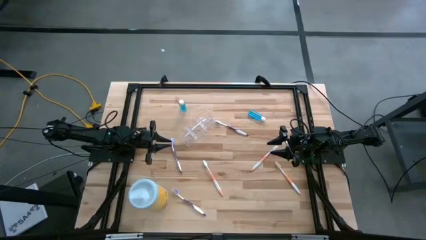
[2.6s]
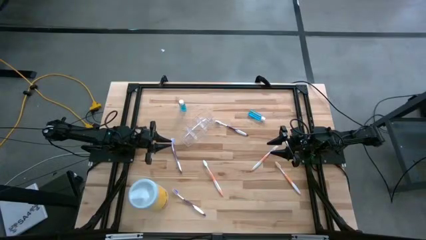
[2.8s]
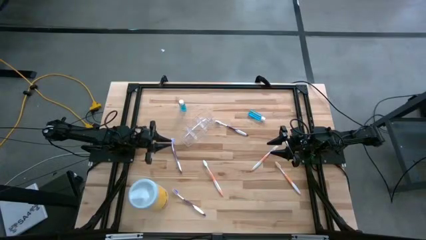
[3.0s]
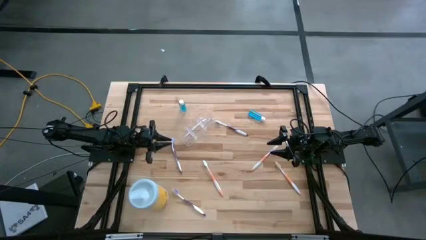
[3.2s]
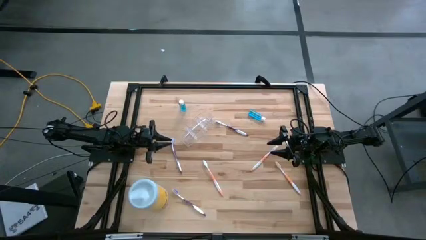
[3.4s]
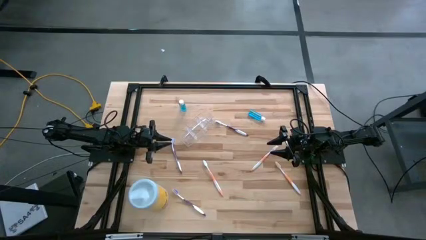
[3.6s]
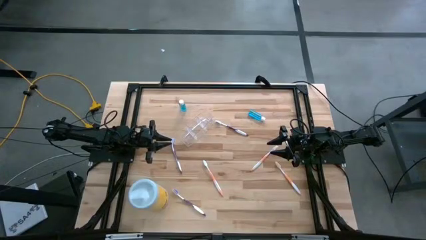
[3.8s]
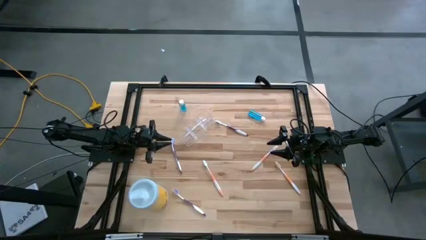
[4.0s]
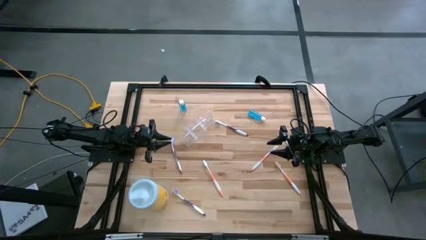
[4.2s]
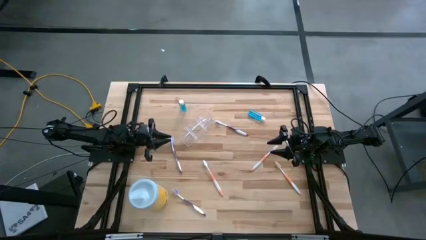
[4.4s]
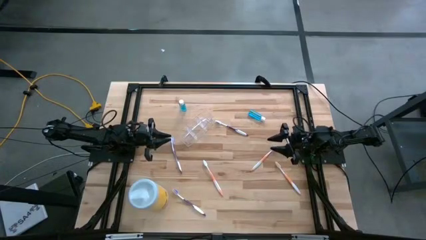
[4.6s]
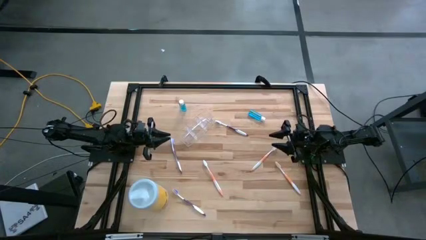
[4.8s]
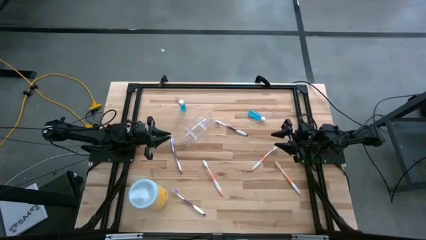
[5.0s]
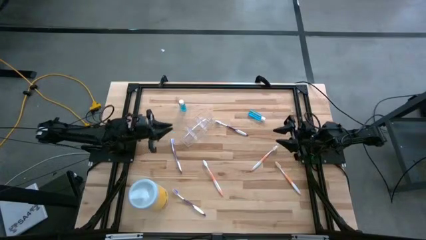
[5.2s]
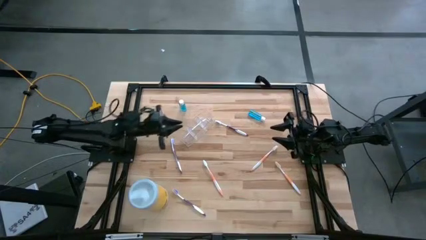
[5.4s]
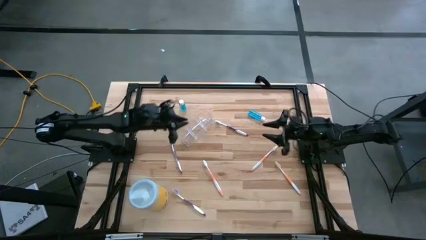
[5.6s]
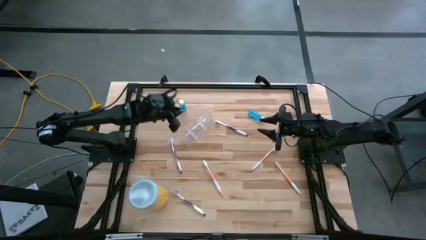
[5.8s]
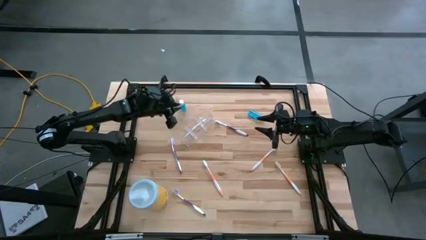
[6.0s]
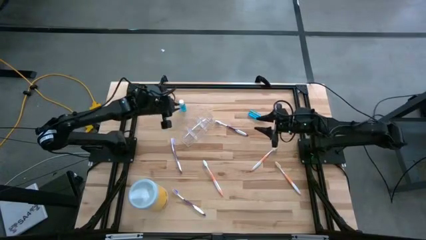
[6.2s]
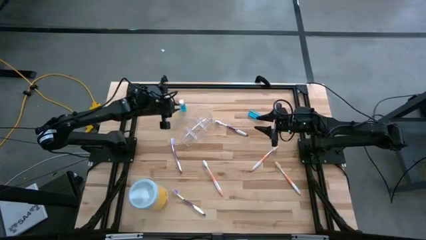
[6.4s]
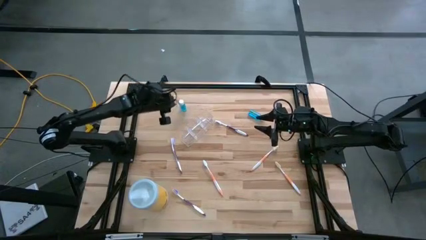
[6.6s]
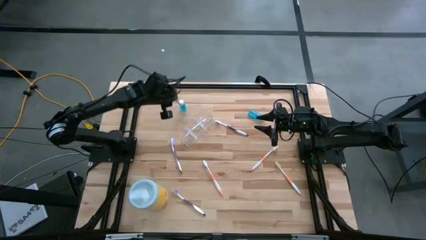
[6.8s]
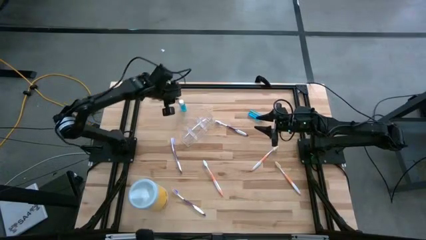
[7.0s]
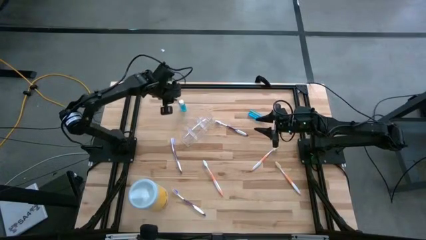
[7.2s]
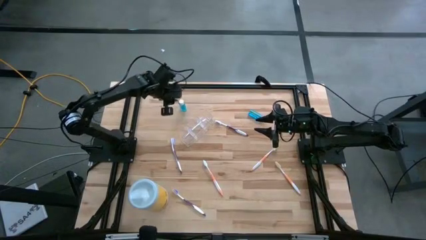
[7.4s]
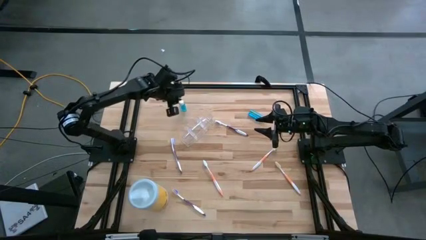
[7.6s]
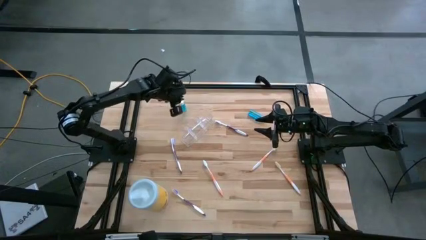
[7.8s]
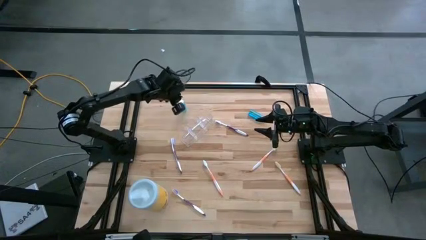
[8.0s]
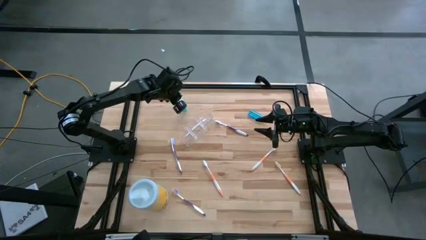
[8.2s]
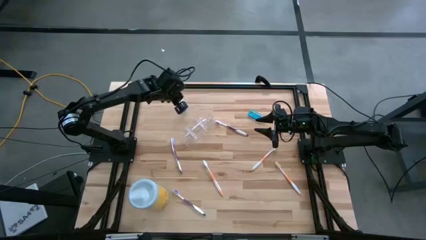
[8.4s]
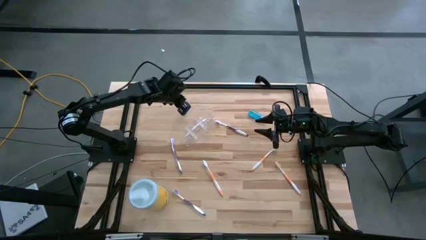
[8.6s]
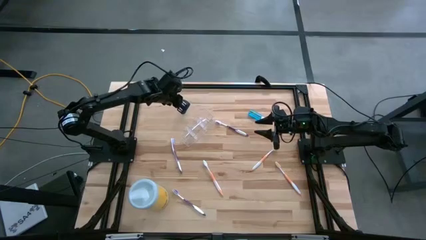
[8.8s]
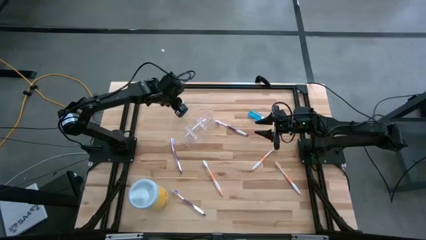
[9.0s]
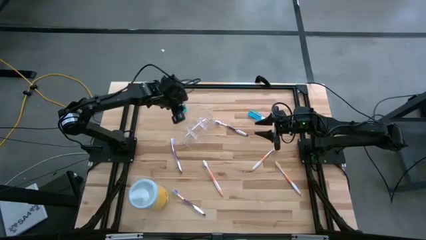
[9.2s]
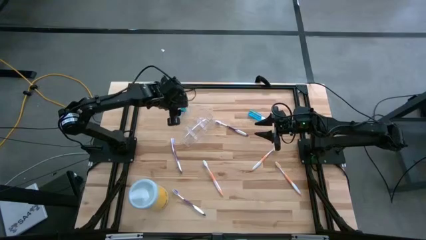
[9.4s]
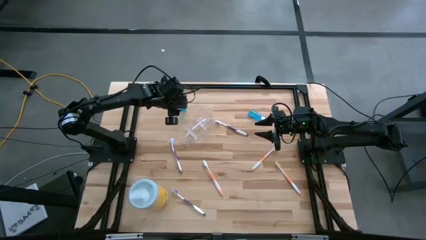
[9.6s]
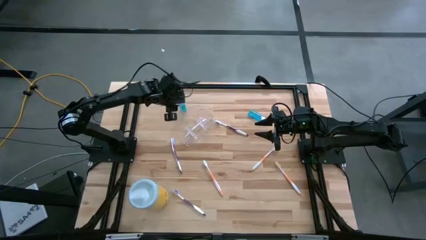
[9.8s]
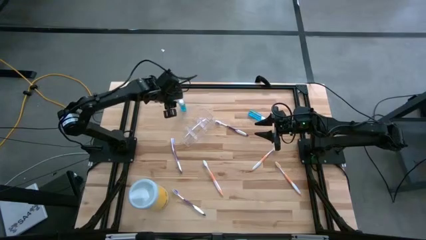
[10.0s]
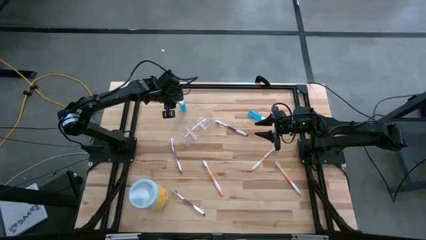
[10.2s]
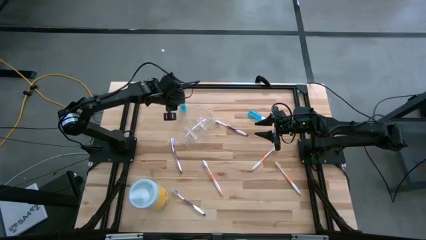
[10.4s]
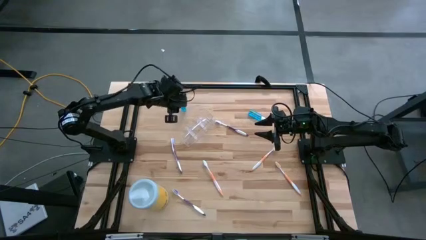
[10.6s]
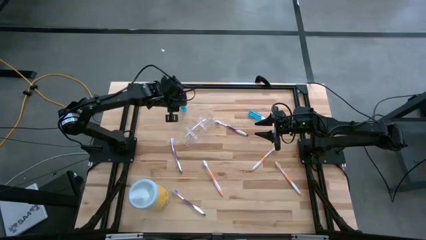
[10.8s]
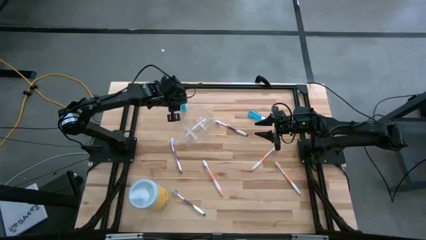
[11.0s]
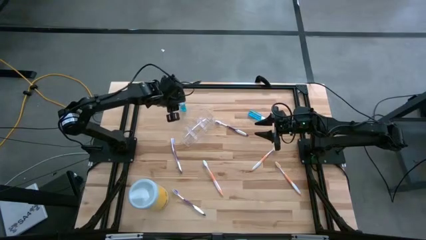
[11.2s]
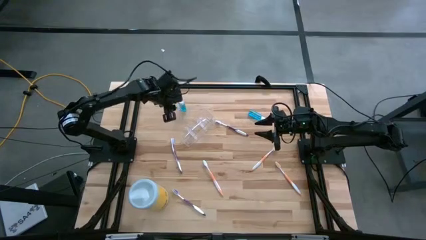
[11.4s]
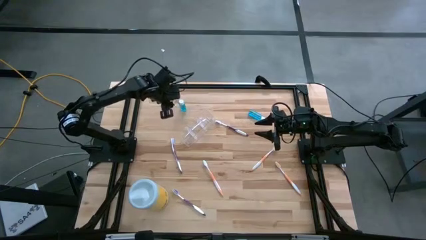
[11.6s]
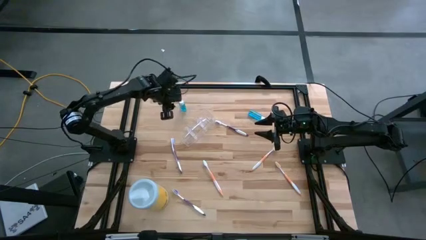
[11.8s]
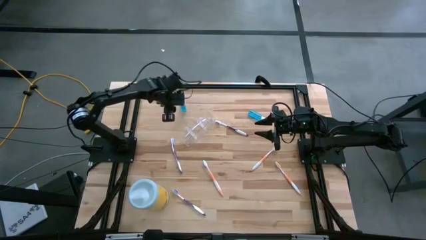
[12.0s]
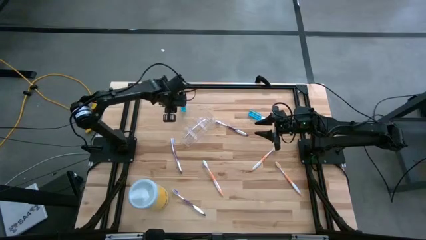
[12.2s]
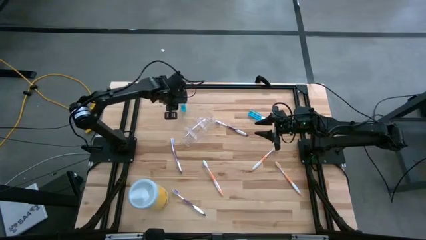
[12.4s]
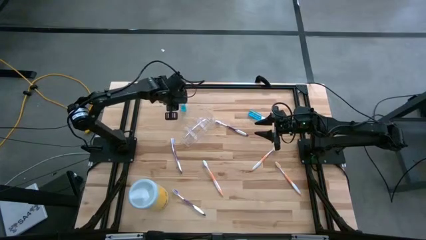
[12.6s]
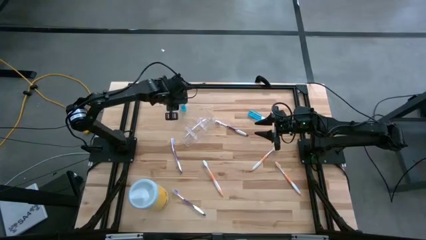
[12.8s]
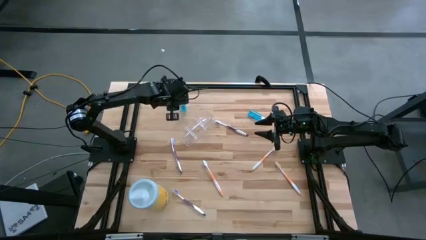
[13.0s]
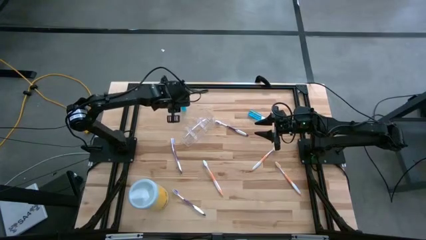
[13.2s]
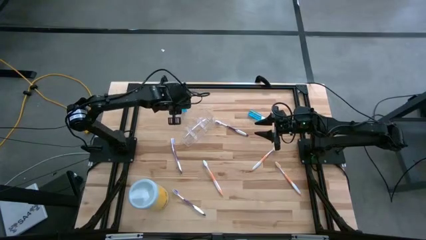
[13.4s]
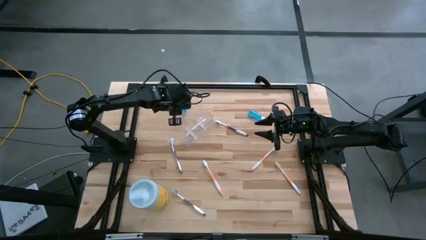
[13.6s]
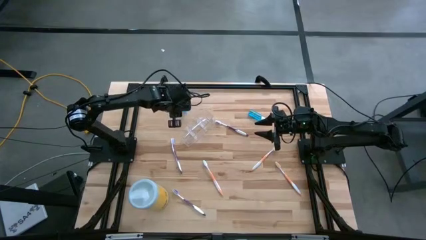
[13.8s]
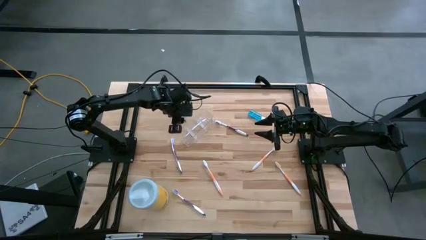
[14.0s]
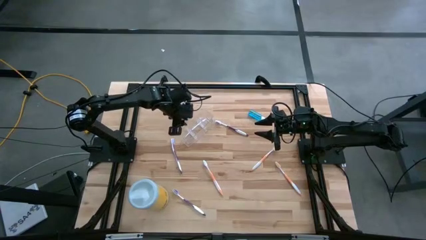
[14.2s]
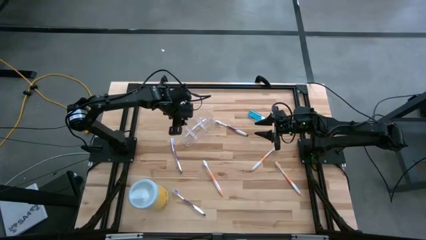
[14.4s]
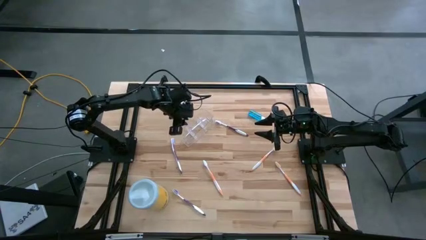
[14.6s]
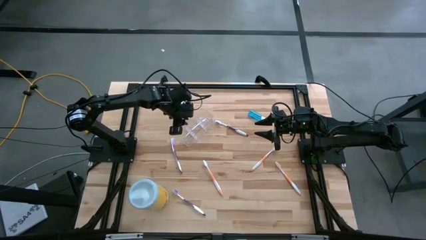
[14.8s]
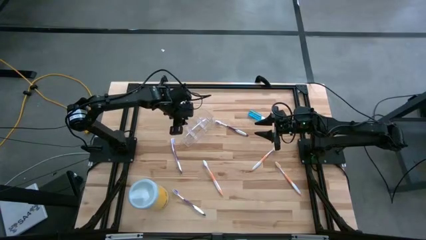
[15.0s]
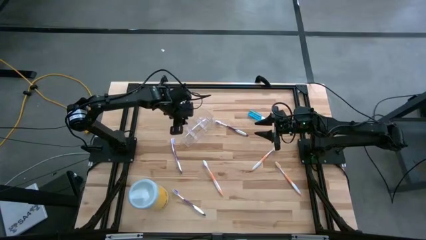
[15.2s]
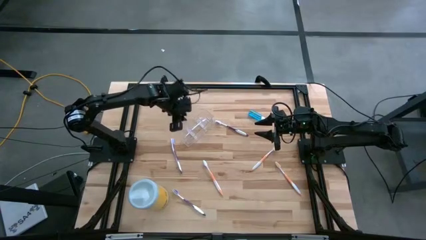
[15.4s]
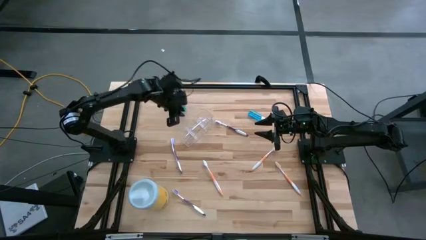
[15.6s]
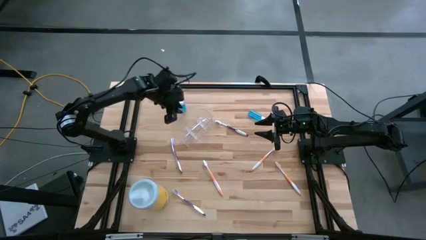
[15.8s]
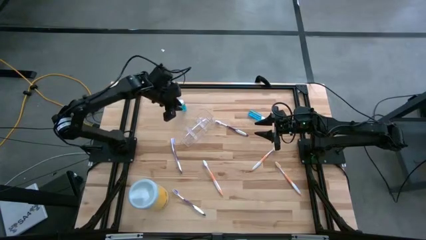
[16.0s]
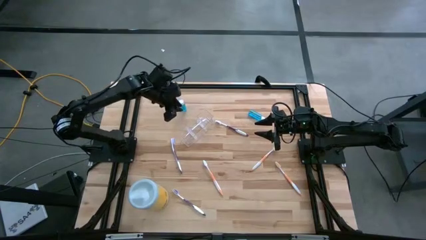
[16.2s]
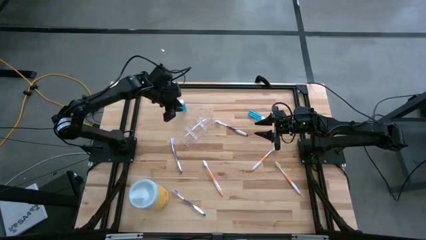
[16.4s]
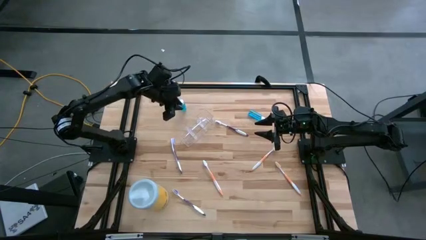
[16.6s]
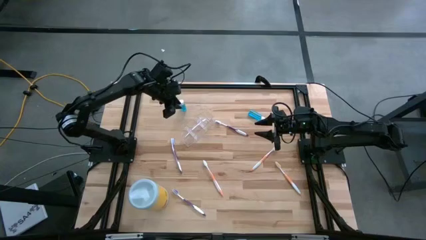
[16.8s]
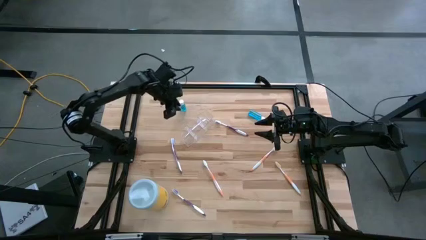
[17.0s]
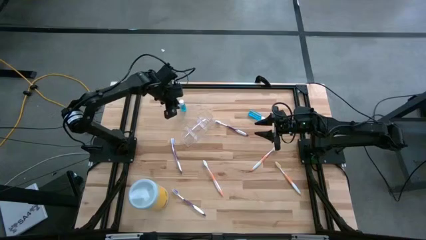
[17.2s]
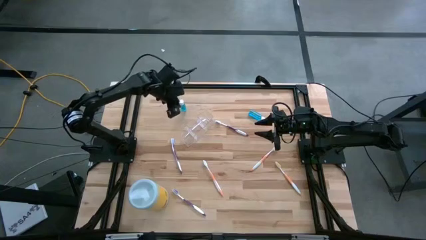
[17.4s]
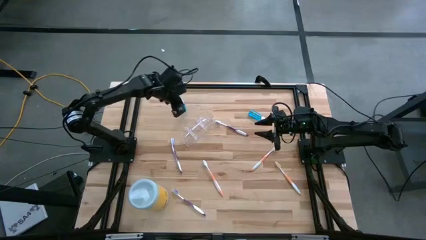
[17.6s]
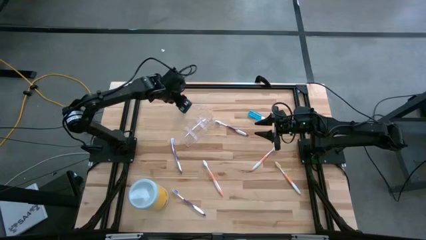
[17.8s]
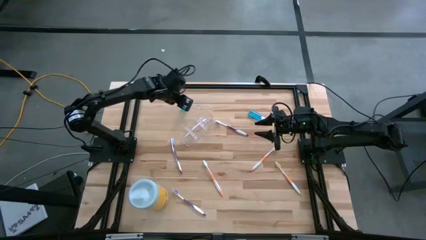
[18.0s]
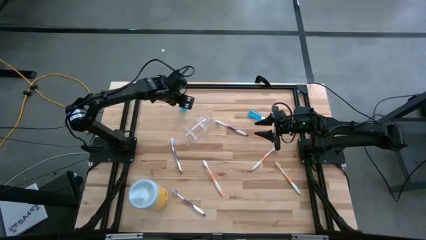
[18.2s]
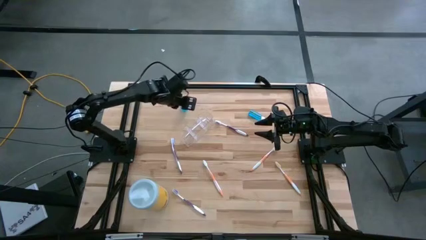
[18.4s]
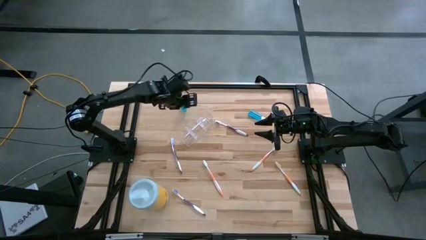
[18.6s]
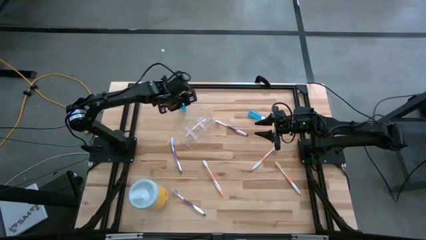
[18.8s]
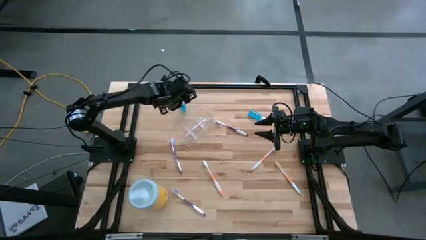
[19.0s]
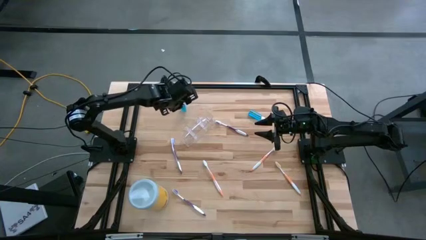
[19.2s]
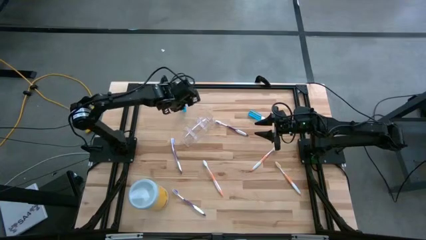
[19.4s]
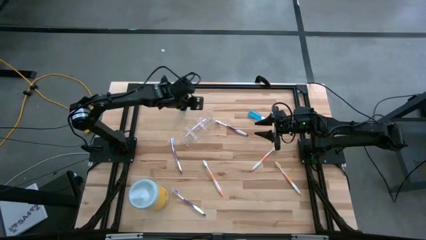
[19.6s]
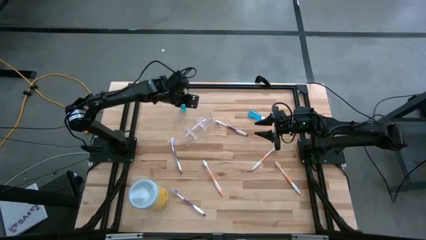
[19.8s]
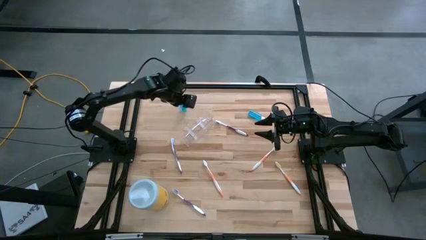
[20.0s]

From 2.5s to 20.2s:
Task: Pick & Place toothbrushing station
Put the left blue mouthwash into the transparent organizer
